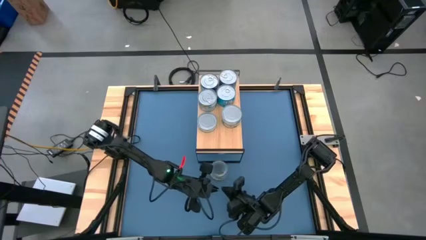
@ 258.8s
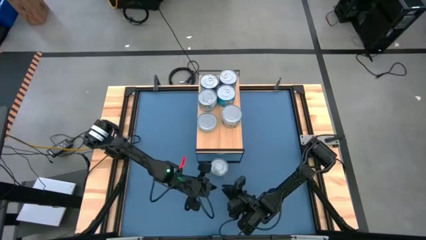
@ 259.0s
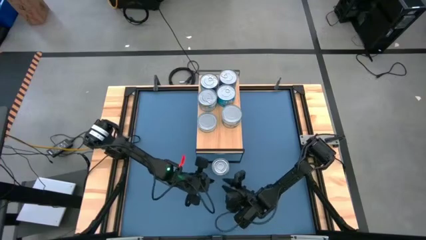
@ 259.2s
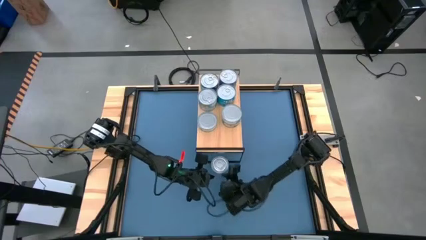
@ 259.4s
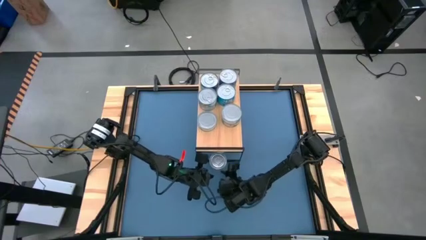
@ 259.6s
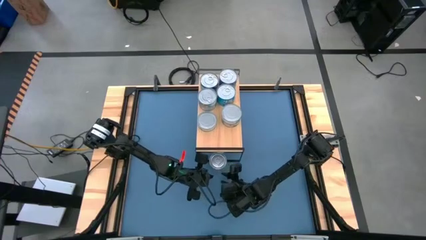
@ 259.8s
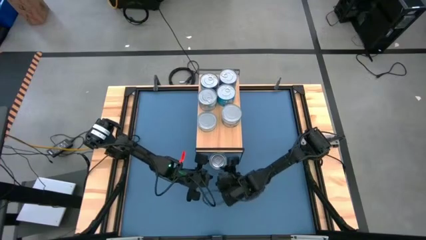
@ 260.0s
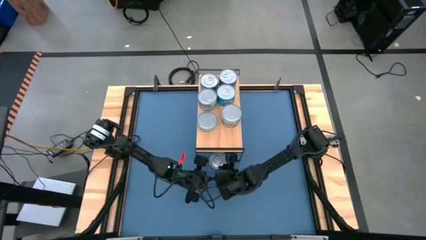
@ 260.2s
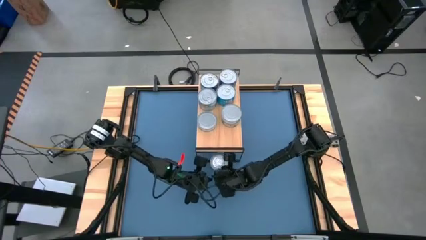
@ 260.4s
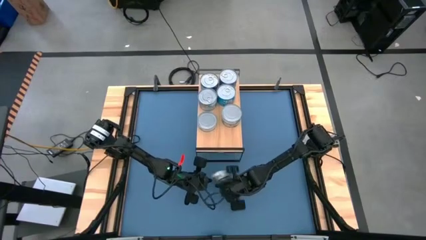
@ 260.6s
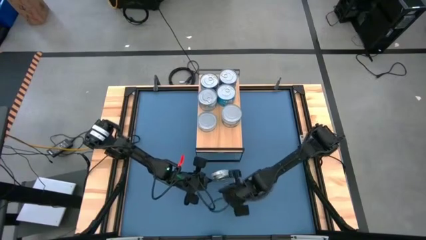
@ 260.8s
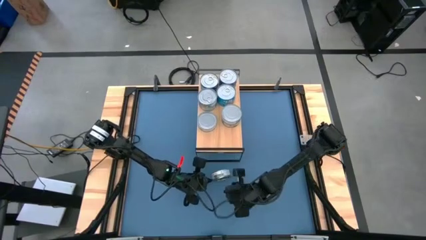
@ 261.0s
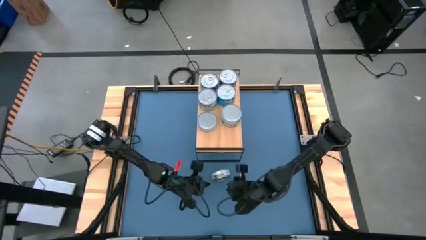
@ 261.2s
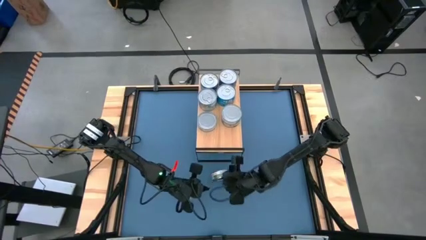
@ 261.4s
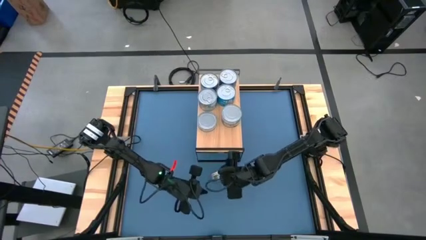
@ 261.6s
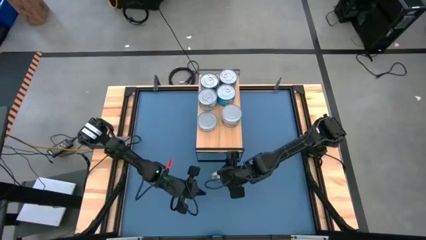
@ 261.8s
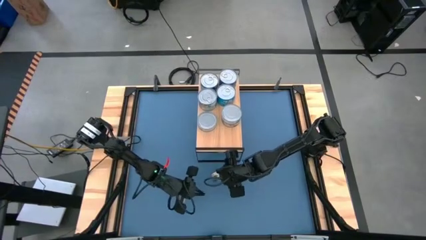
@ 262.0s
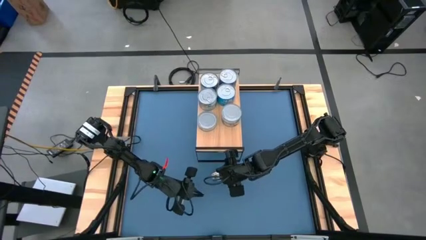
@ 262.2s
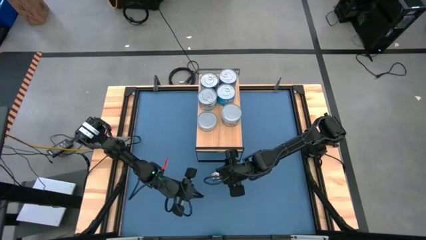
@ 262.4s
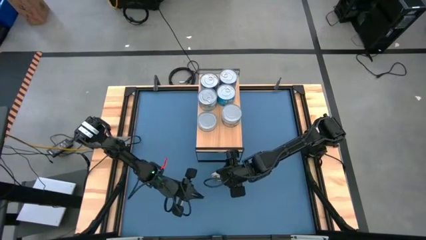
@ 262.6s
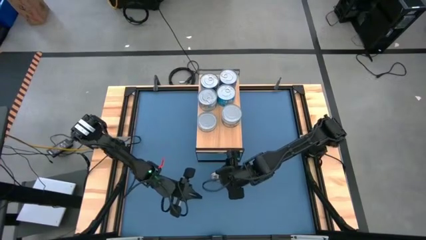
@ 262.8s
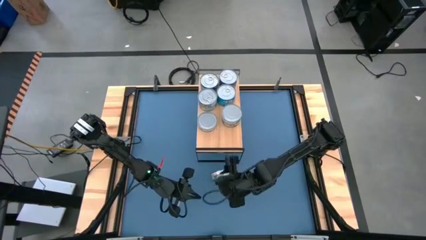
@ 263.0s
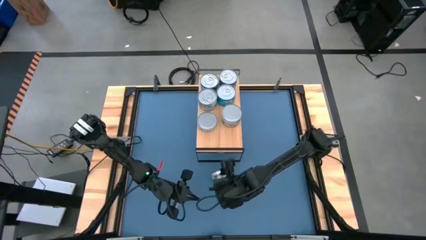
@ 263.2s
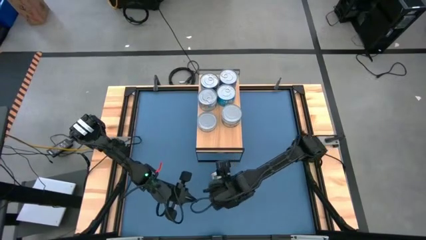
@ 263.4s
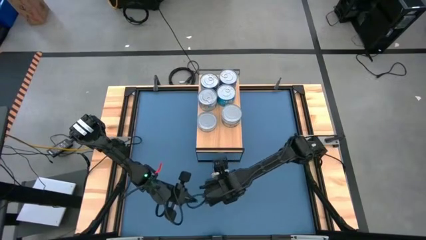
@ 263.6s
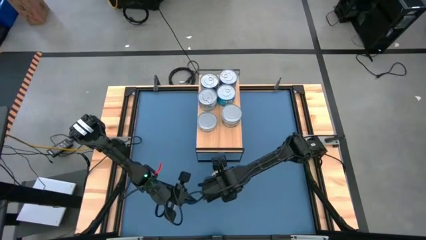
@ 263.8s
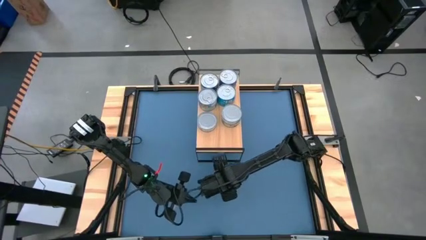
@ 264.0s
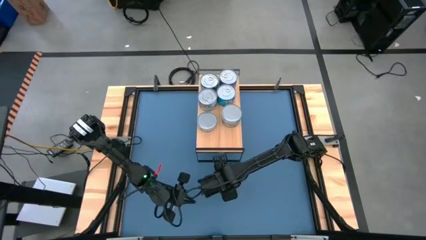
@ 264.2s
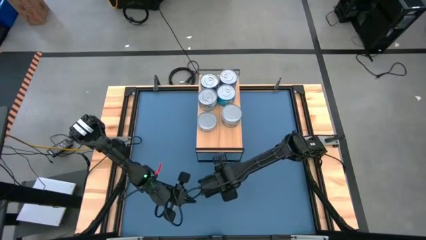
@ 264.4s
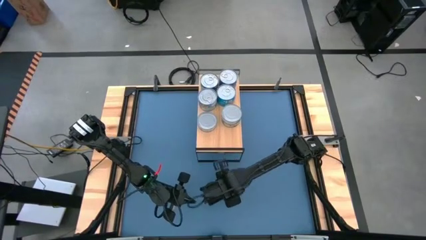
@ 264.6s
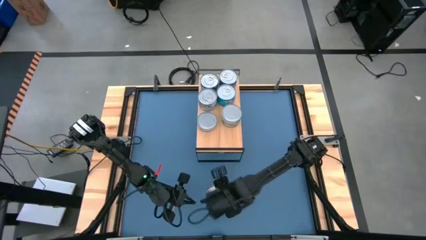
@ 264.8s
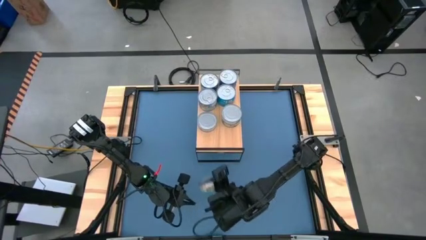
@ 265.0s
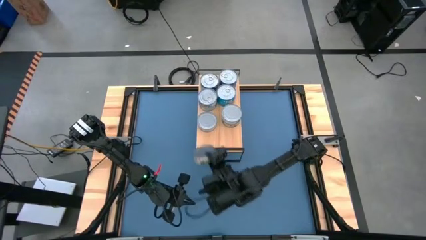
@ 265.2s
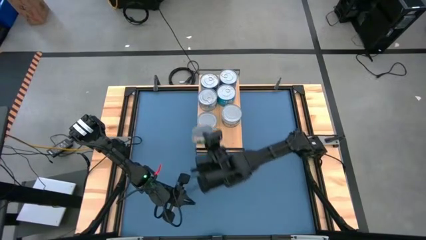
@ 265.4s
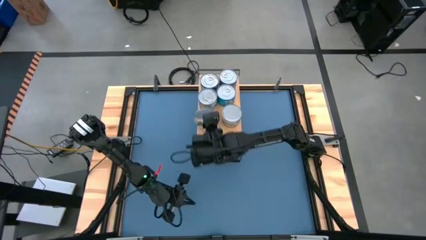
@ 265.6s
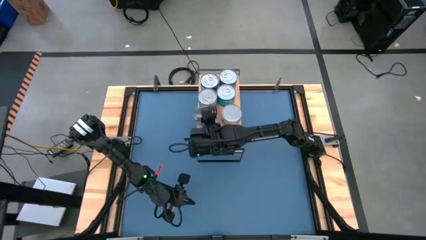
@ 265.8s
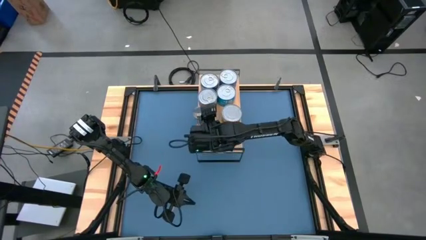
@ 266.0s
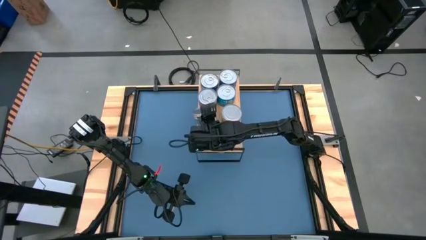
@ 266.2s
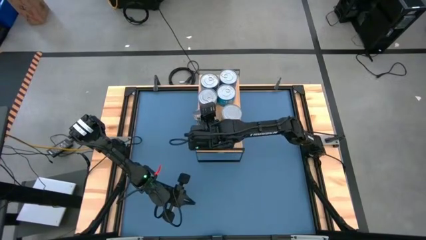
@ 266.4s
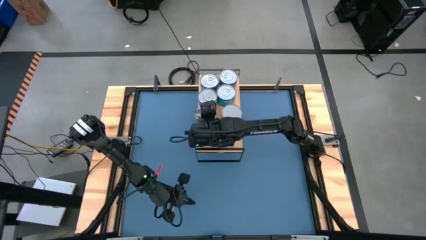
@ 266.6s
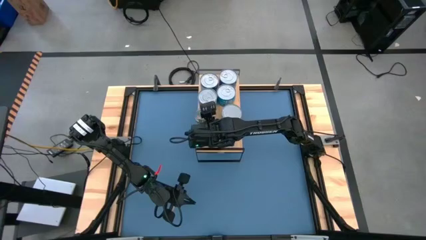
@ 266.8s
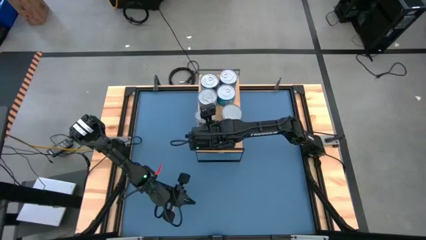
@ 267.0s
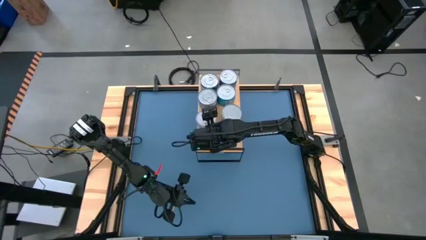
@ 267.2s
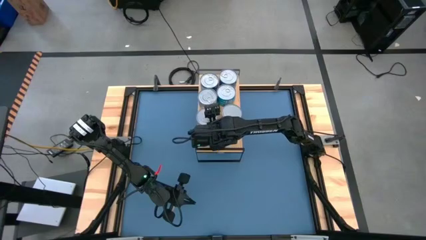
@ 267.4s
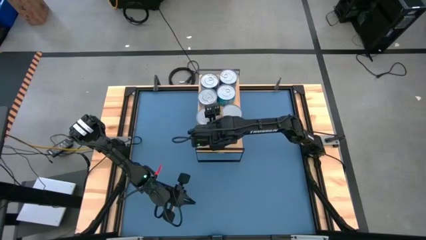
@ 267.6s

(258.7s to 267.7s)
Task: Stack canned seafood by type on shelf
Stack the green tuna can on top of the other green tuna can on the shelf

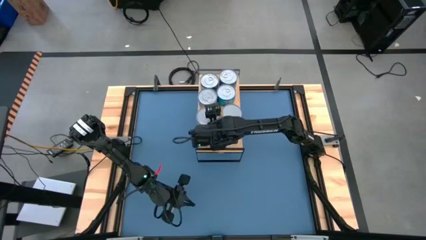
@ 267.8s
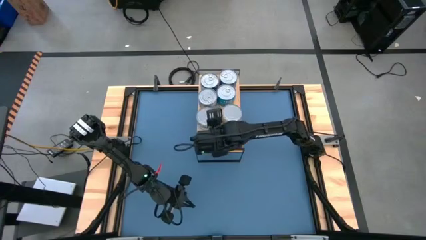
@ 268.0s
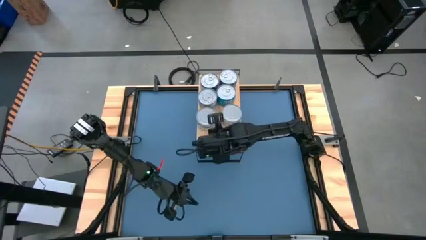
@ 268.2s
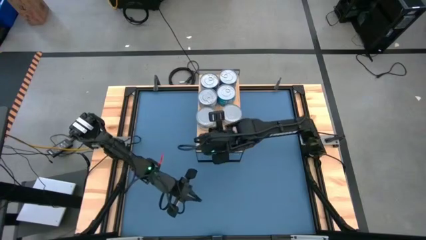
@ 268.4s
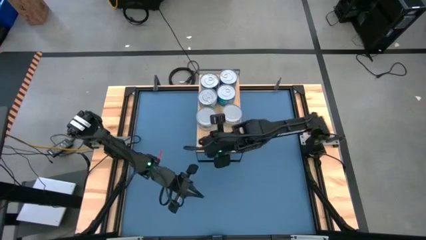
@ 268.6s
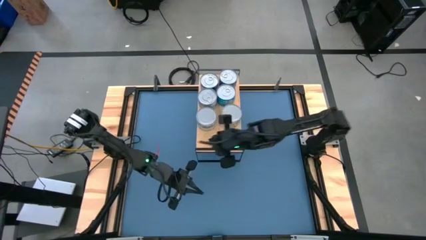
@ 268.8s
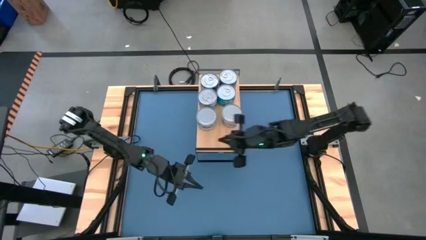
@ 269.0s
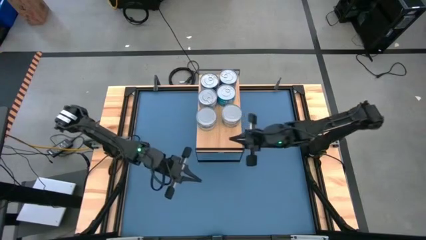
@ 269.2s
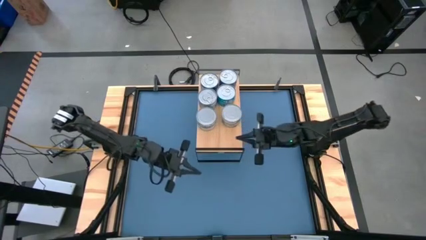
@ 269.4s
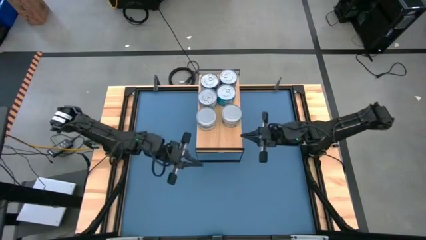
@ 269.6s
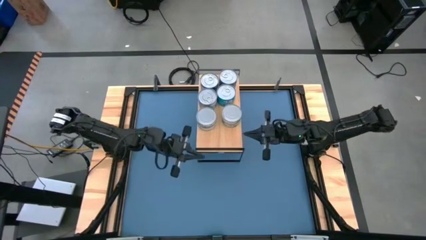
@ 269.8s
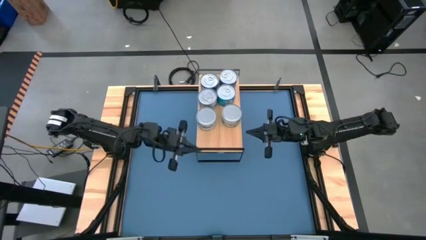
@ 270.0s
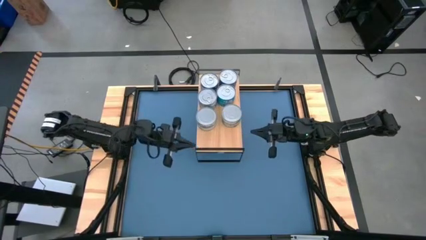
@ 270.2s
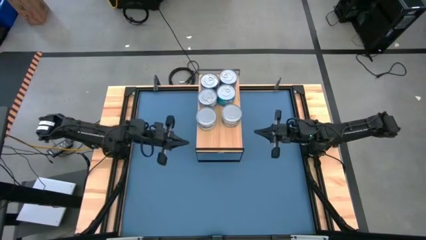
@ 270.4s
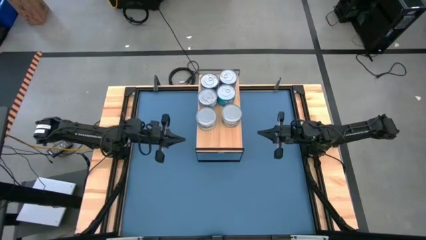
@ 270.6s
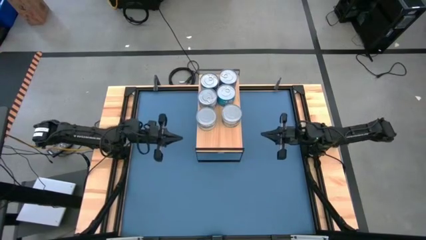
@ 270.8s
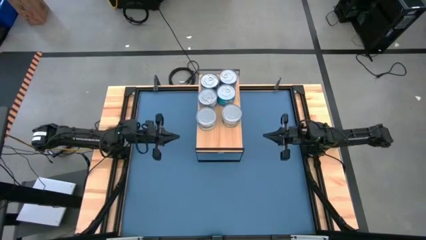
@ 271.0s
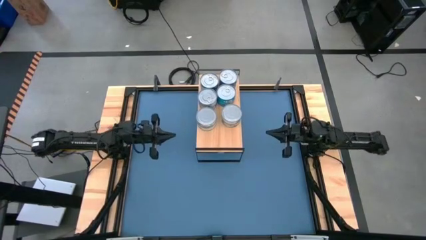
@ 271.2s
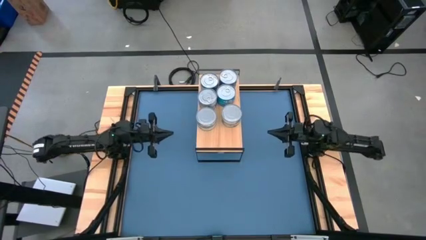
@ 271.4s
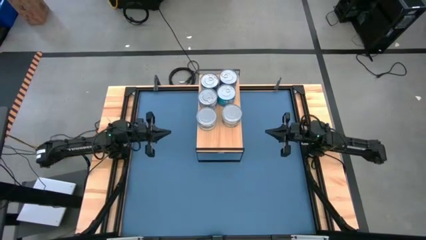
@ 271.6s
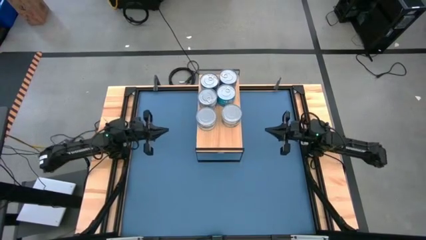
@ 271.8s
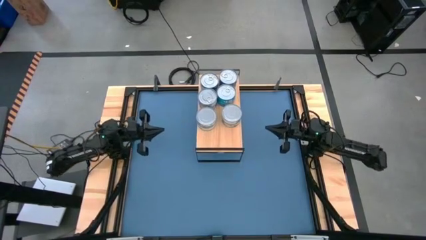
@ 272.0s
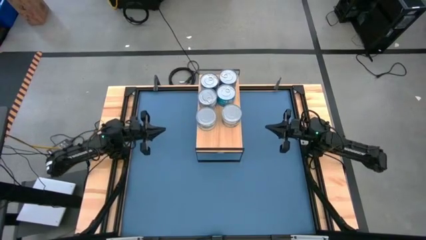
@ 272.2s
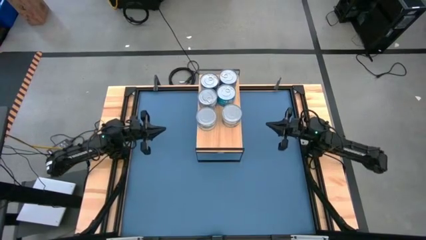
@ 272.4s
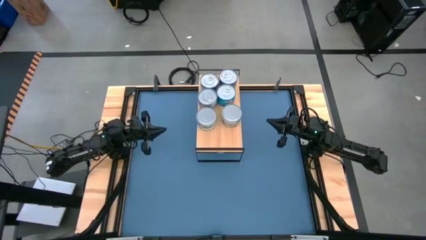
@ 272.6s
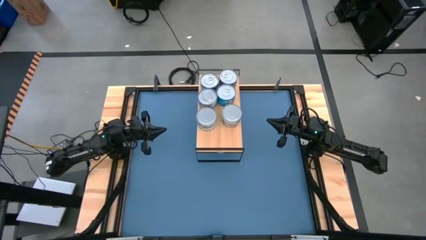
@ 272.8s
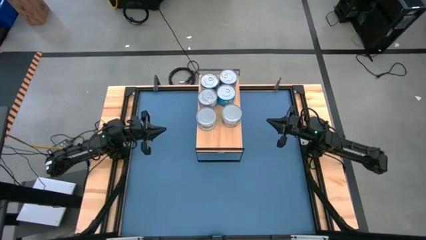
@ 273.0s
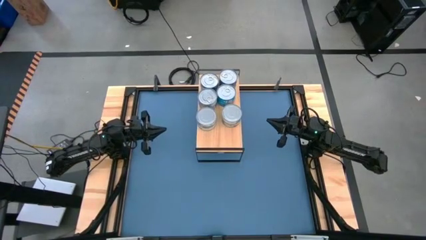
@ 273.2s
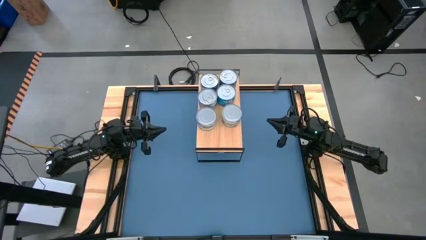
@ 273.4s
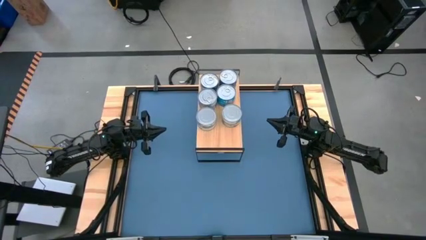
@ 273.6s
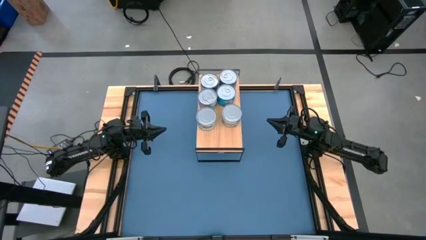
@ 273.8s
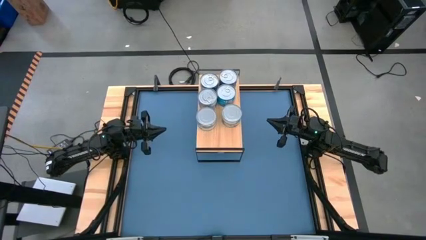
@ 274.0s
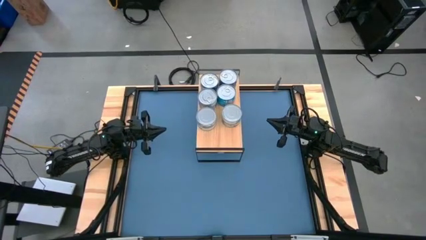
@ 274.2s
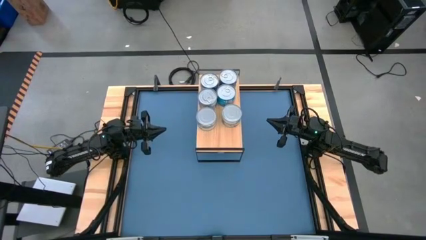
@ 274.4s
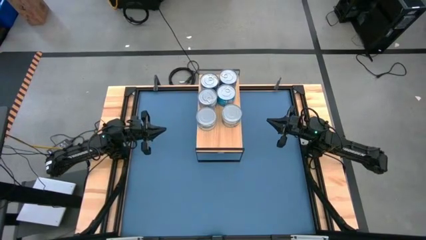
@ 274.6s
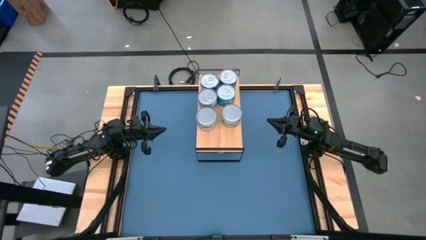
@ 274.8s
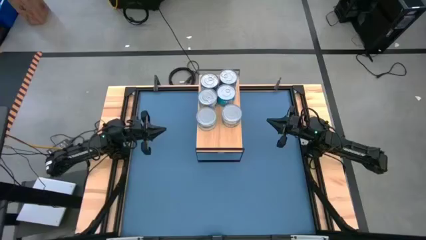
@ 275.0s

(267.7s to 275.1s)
Return to Home Position
